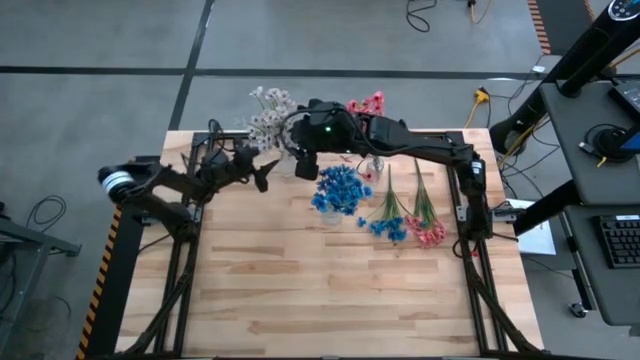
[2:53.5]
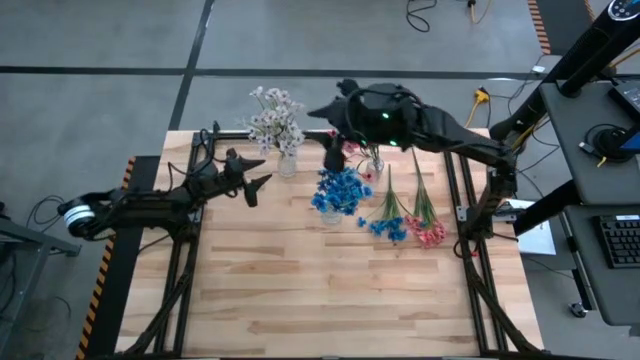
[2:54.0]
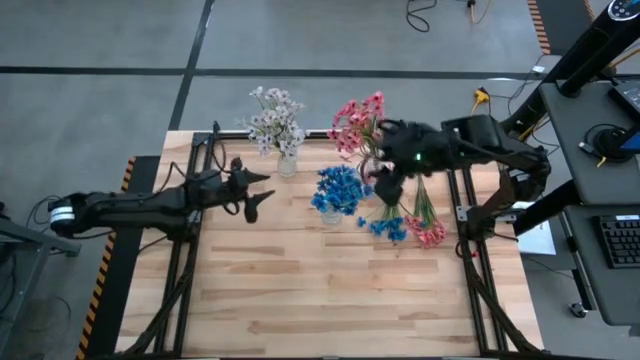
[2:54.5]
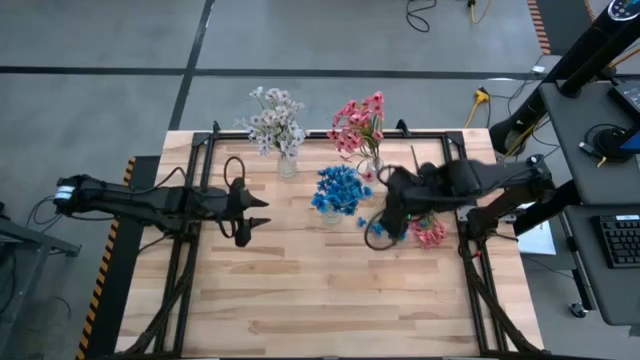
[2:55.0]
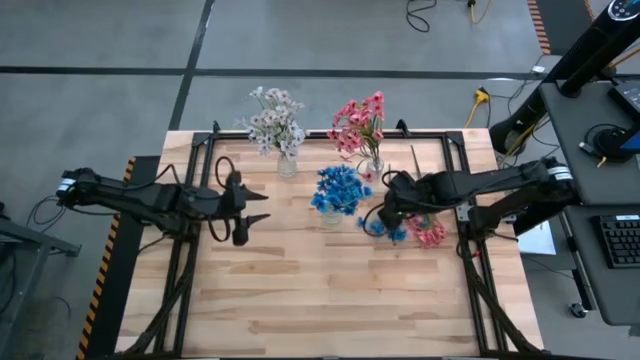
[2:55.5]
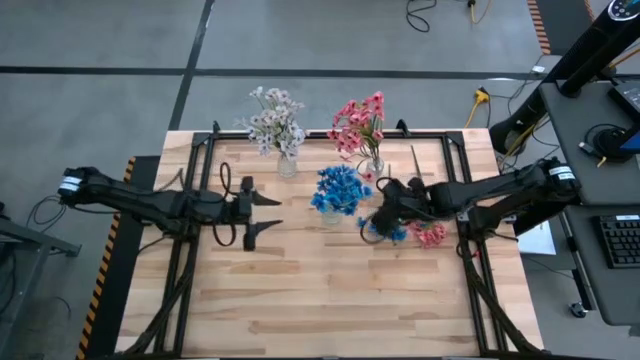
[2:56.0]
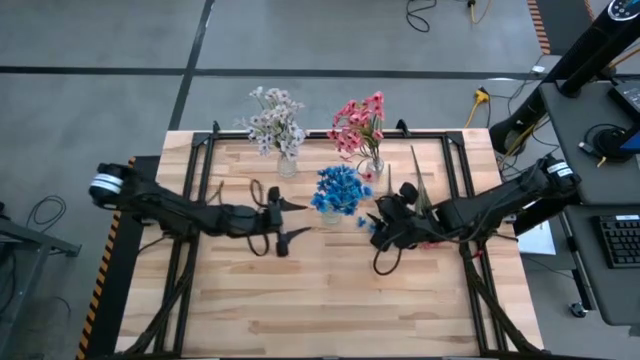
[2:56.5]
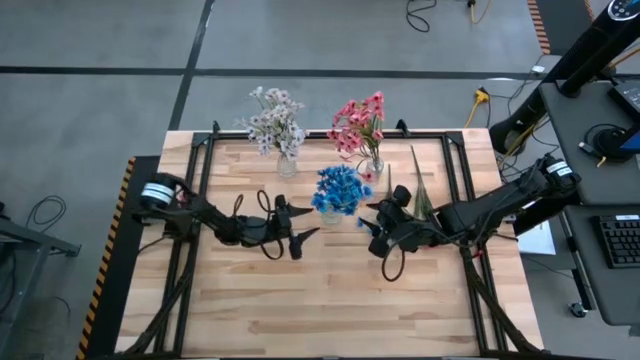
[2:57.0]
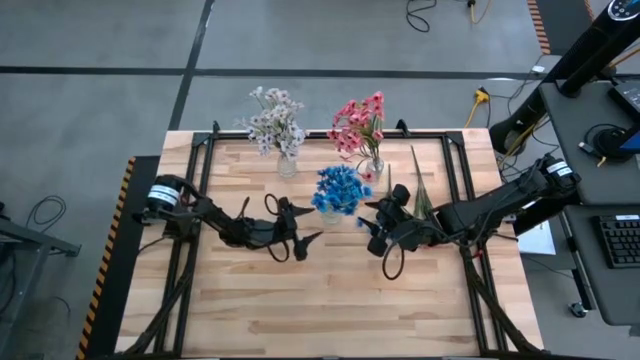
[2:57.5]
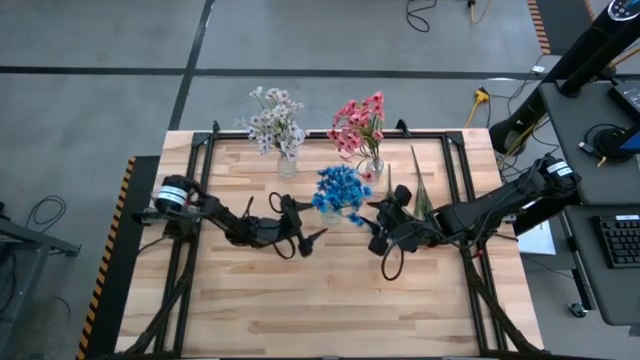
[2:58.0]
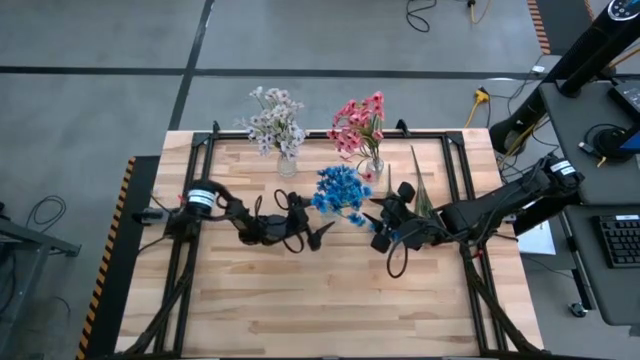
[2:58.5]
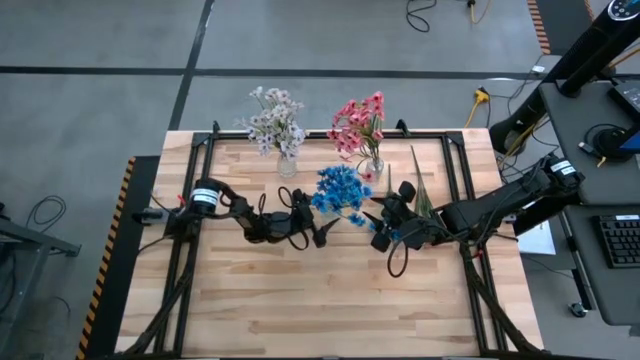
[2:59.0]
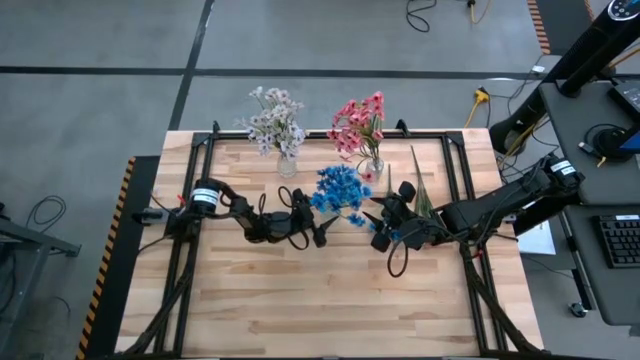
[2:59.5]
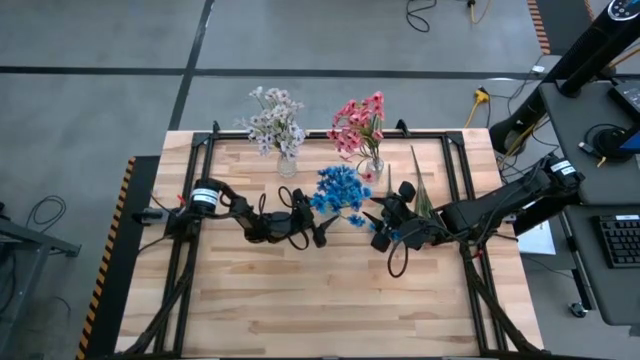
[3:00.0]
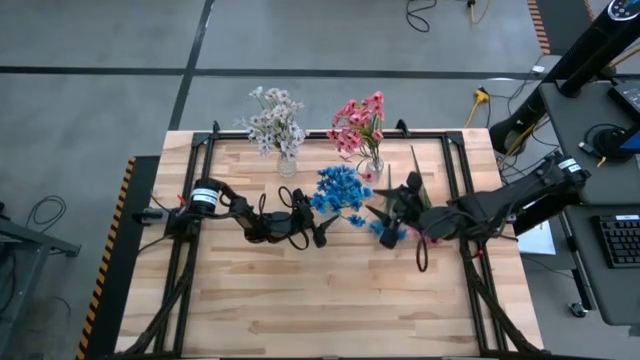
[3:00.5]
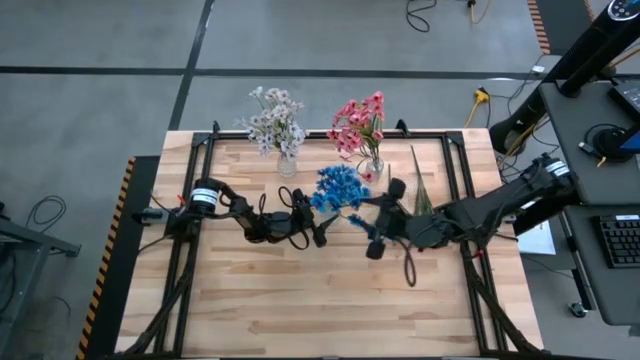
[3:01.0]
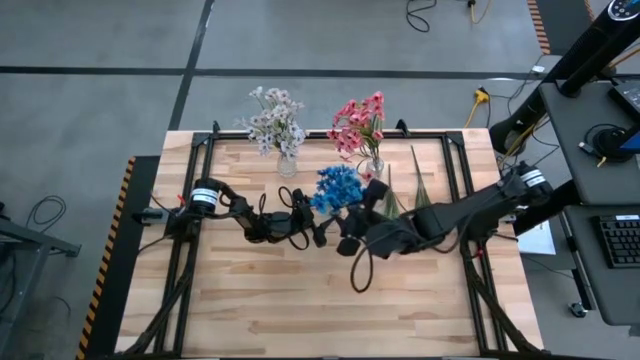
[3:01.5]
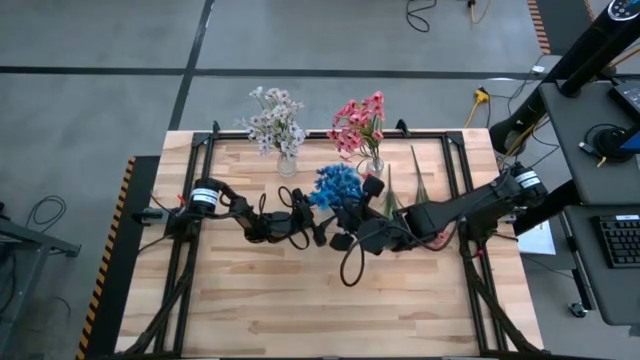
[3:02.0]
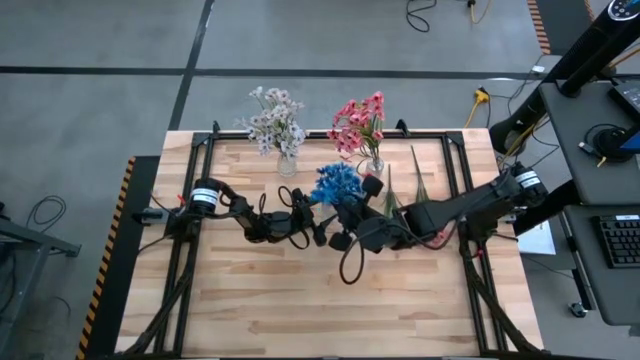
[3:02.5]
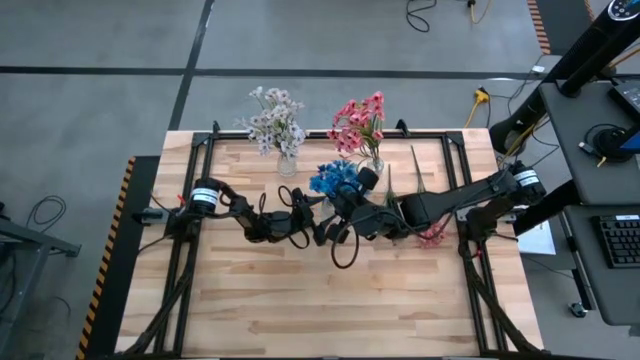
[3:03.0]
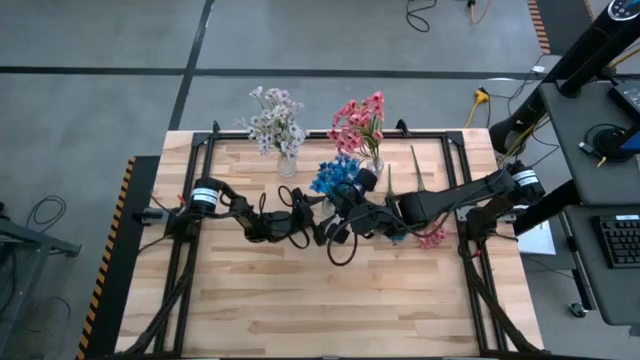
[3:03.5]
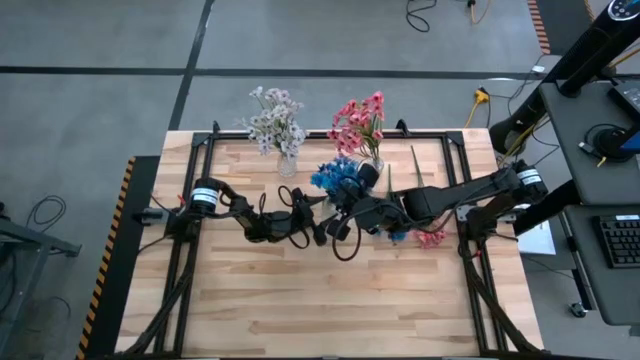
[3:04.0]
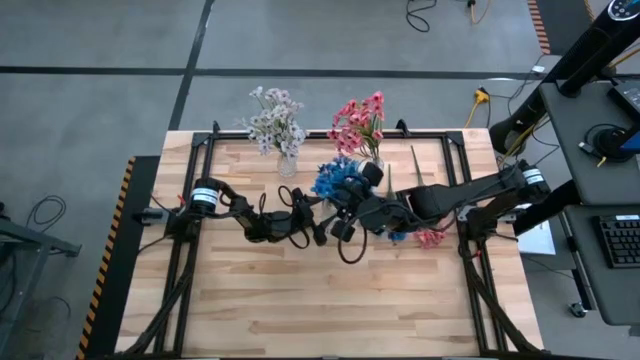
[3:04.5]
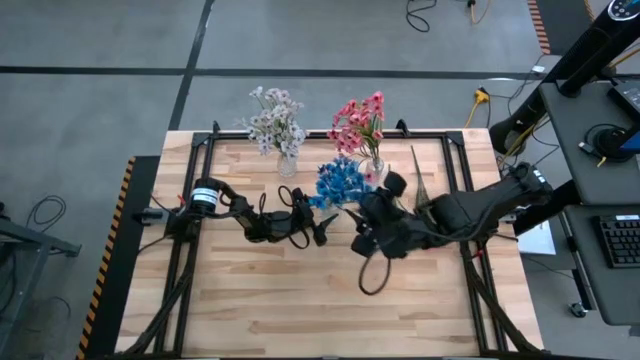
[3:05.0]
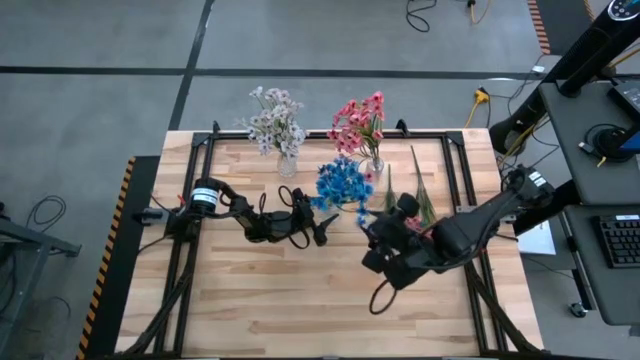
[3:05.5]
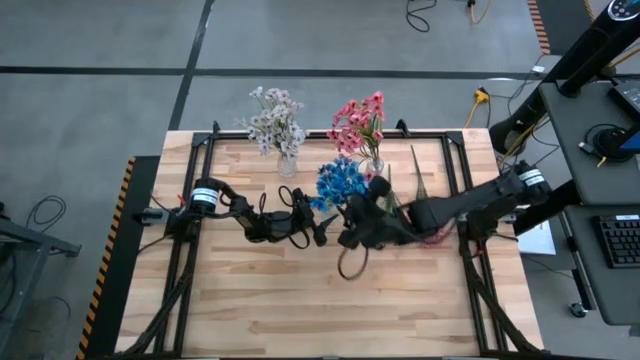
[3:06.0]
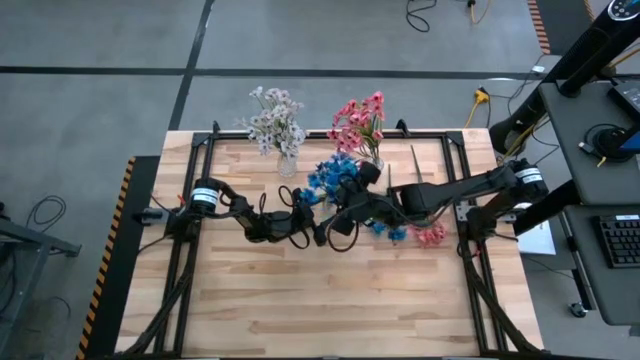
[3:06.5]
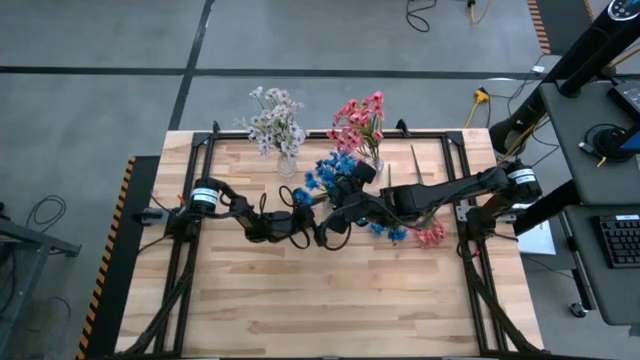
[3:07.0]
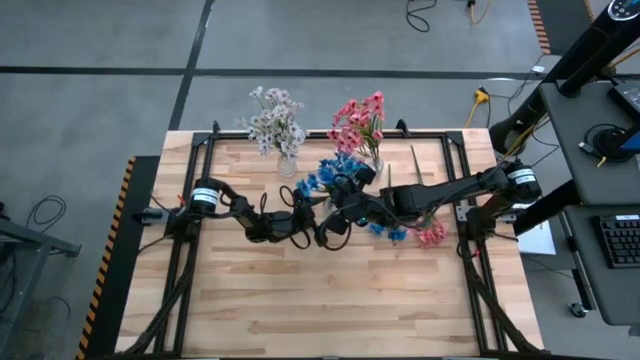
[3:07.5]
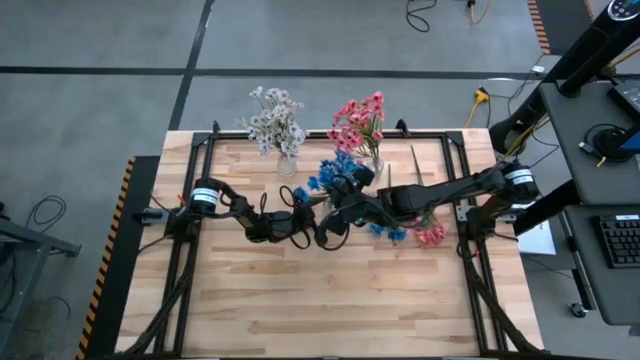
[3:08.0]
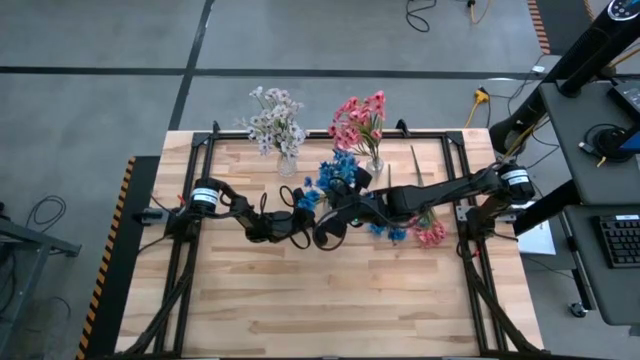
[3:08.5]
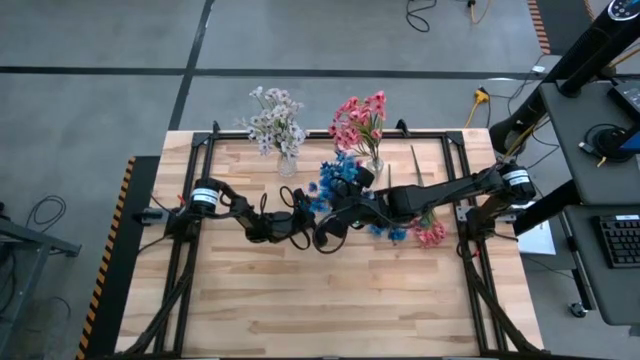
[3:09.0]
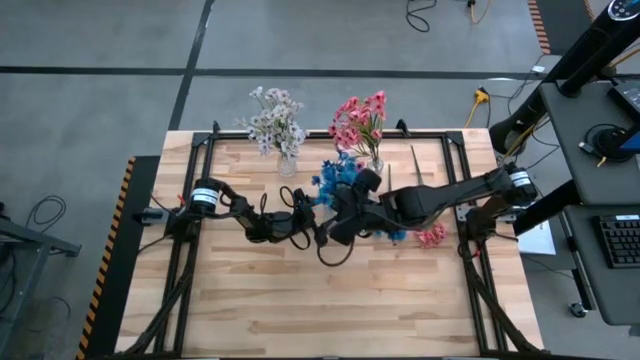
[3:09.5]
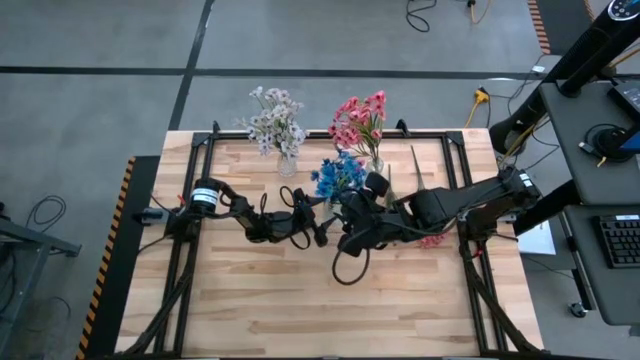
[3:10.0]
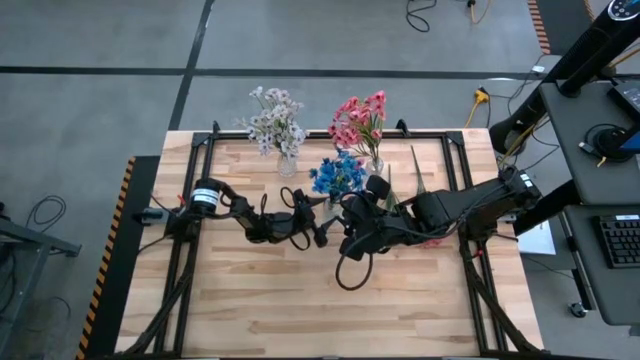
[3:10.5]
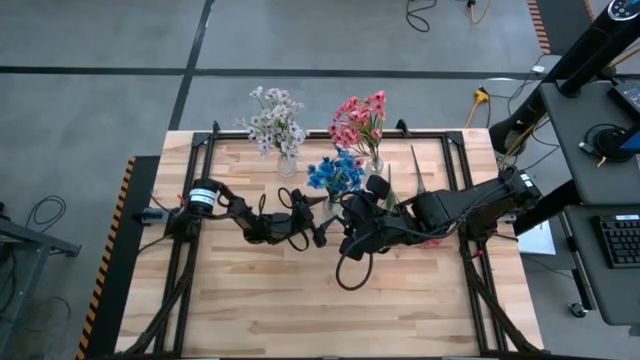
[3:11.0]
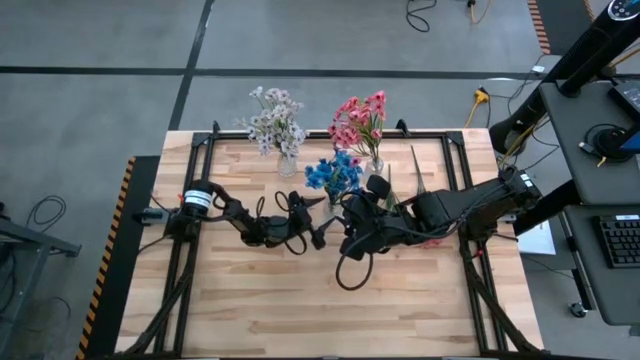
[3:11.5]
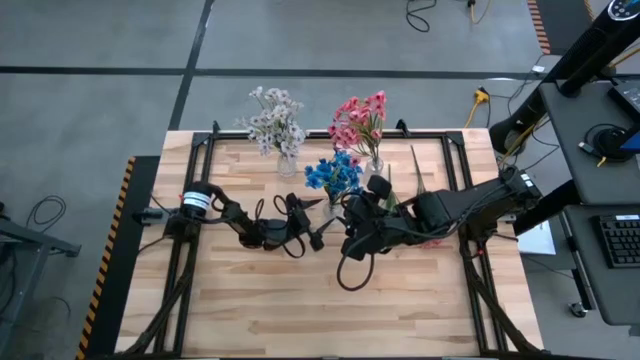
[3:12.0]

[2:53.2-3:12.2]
Task: Sort flowers into vase by color
Adjust the middle blue flowers

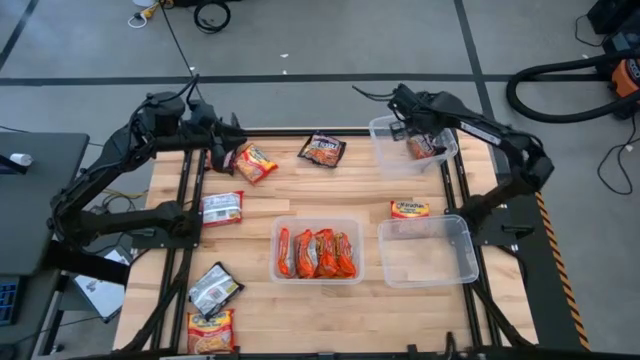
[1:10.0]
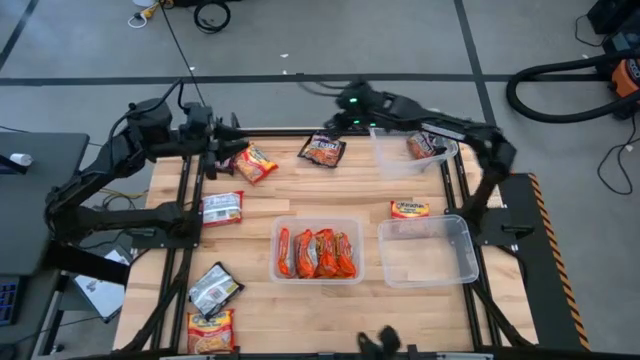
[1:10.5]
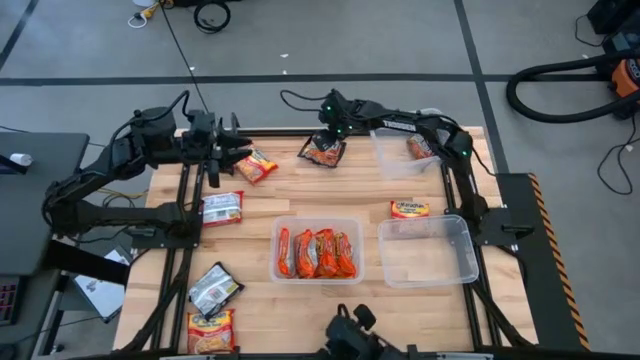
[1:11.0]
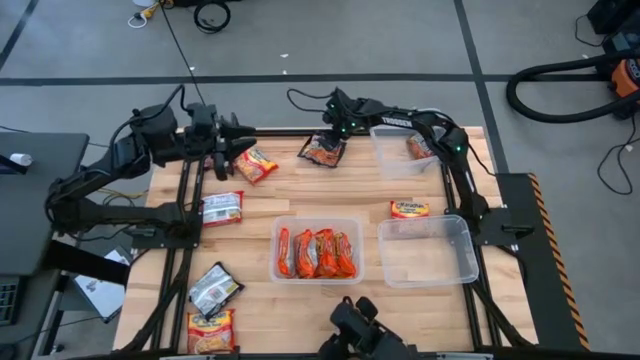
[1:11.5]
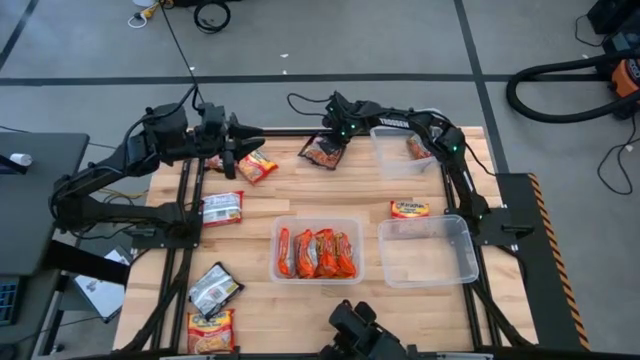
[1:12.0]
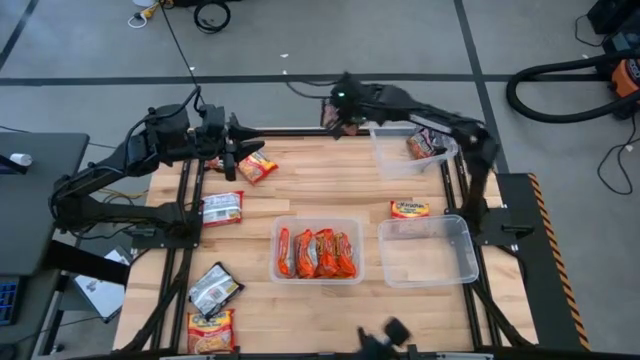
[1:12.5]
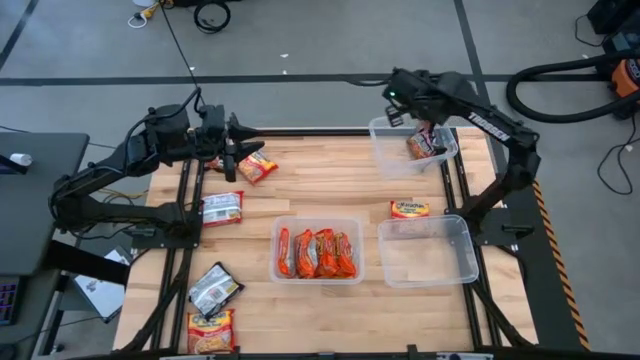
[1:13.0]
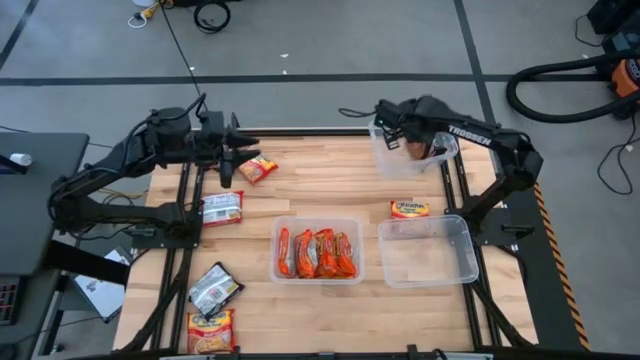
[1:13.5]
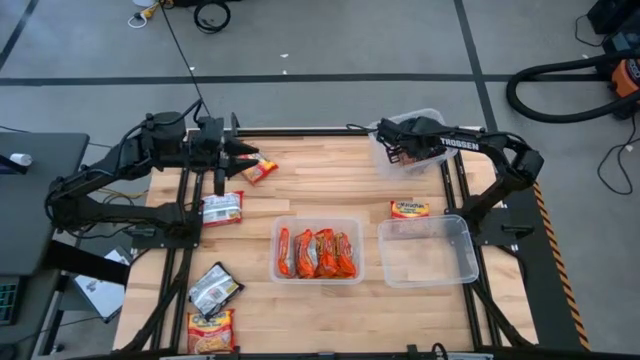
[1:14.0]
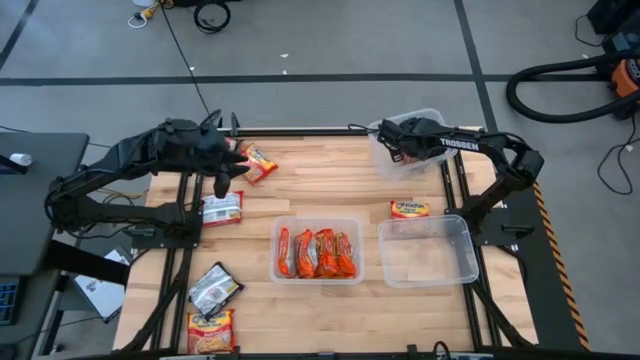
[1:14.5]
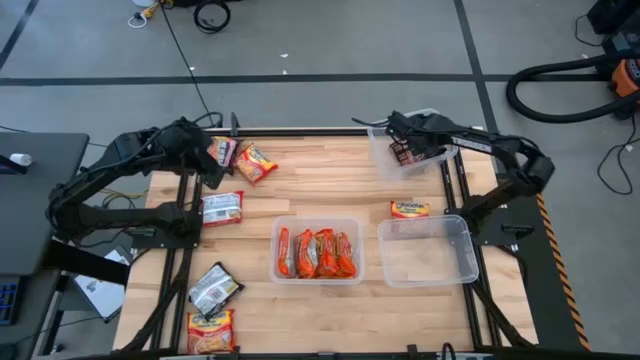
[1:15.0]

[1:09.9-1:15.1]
Task: Sort Maruchan noodles
Put the black noodle pack into the top transparent bin
